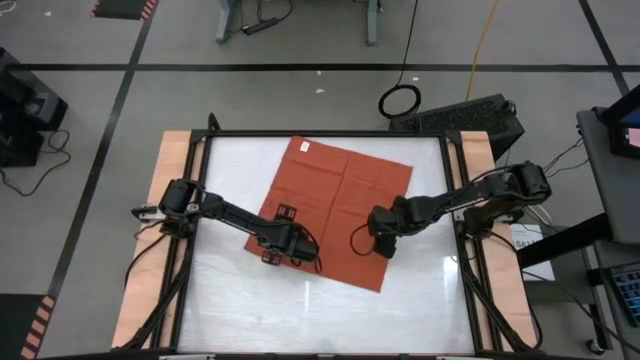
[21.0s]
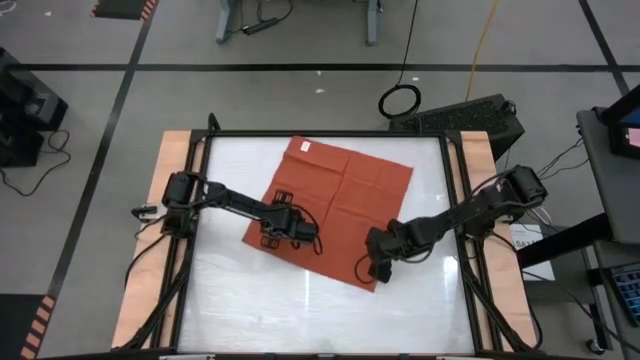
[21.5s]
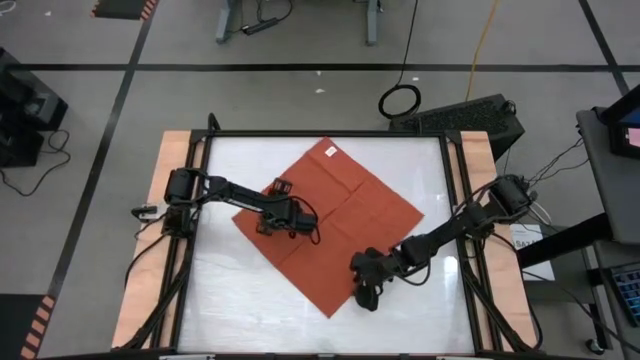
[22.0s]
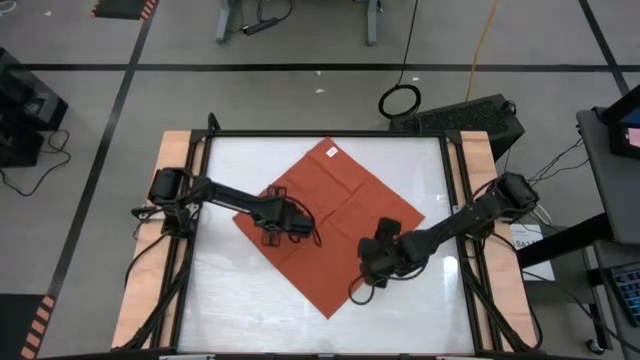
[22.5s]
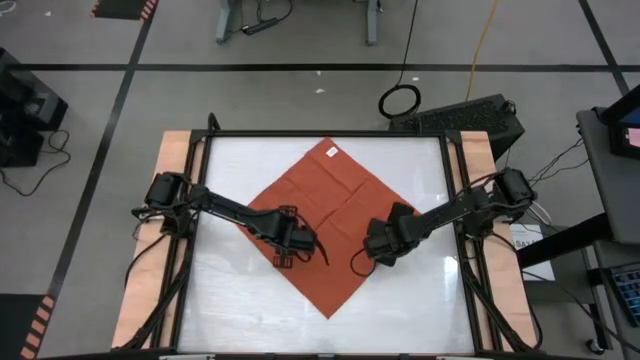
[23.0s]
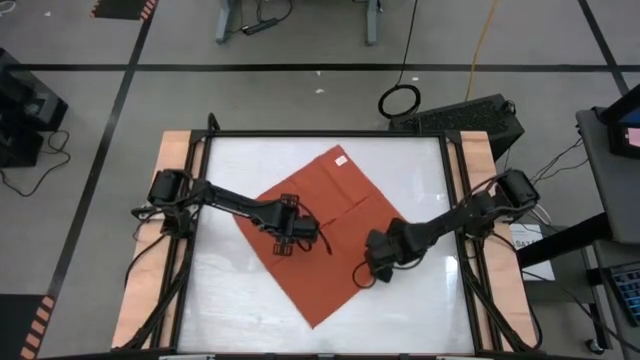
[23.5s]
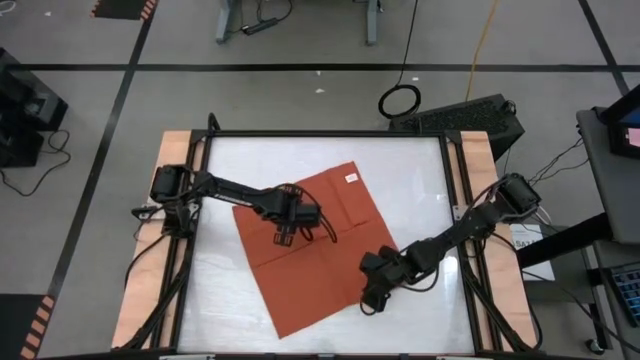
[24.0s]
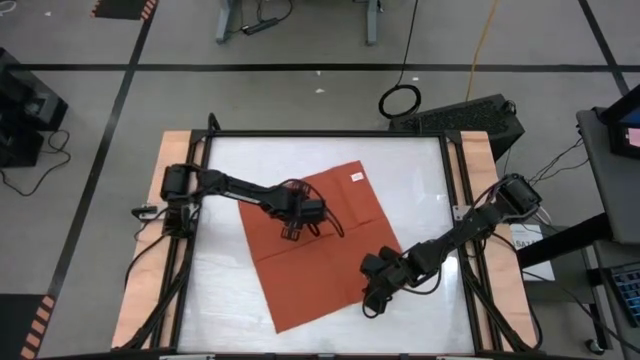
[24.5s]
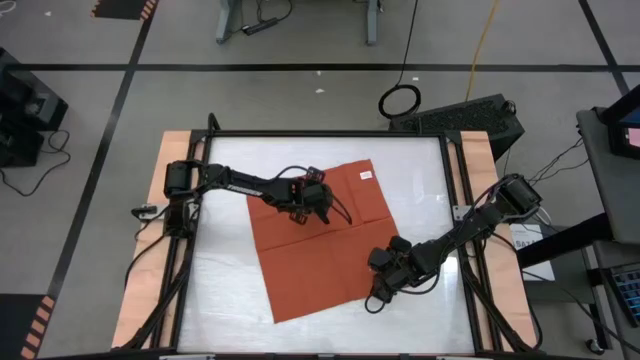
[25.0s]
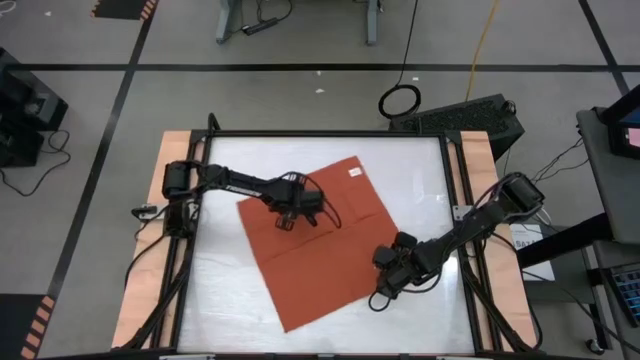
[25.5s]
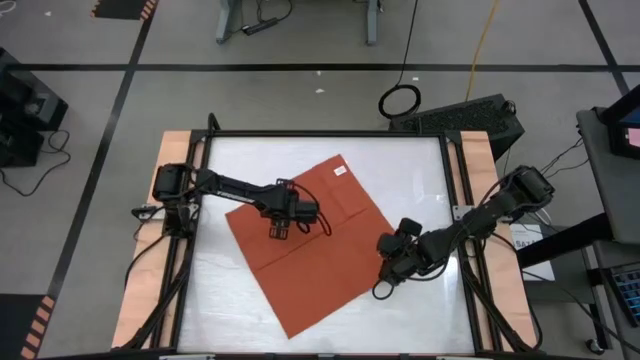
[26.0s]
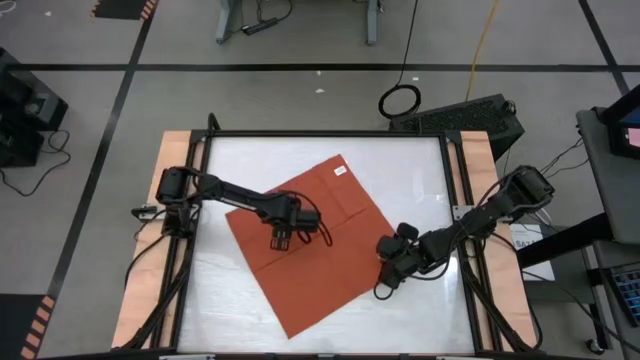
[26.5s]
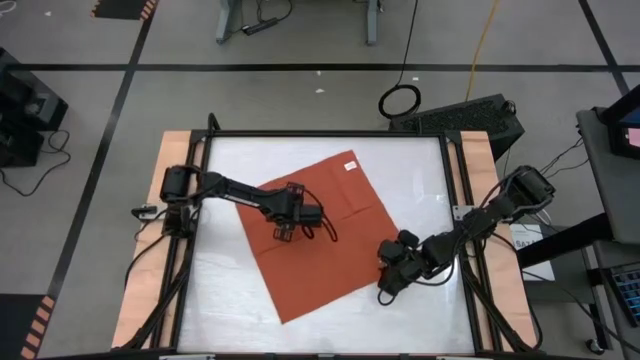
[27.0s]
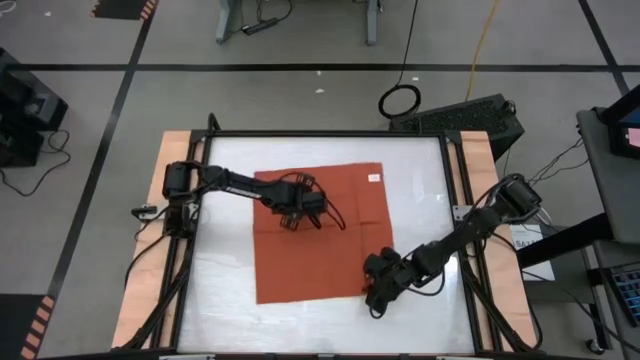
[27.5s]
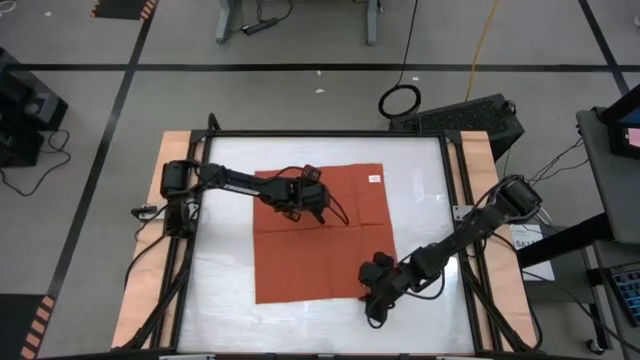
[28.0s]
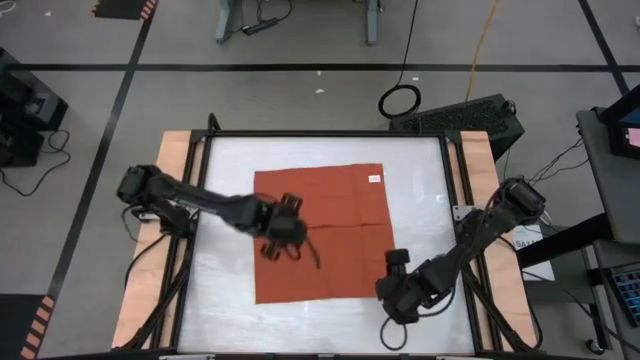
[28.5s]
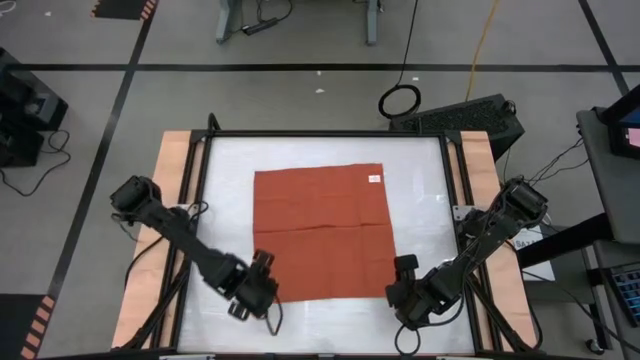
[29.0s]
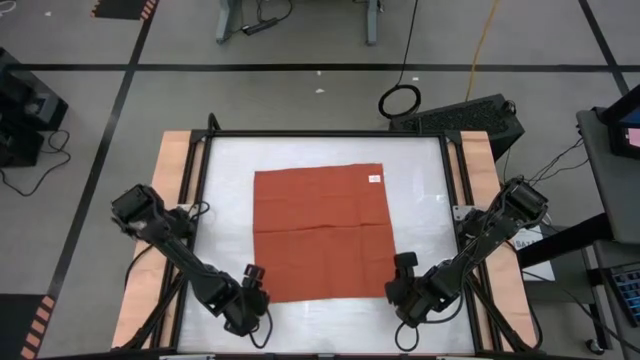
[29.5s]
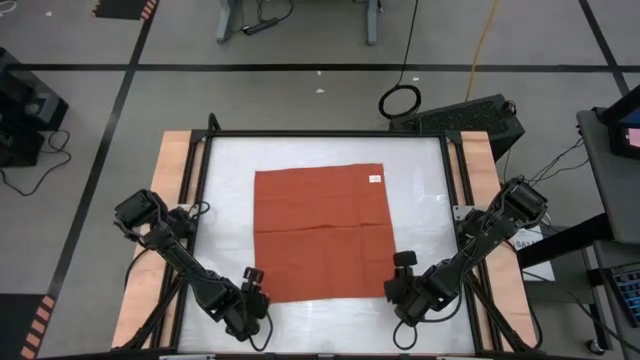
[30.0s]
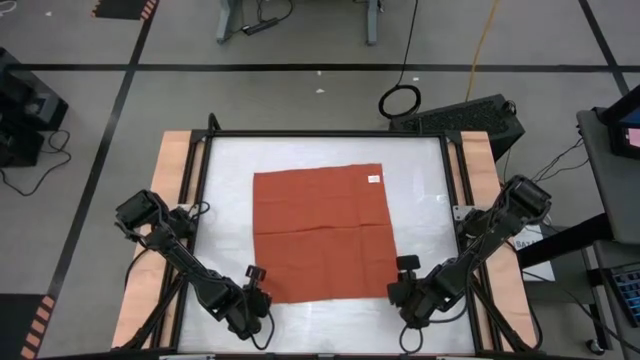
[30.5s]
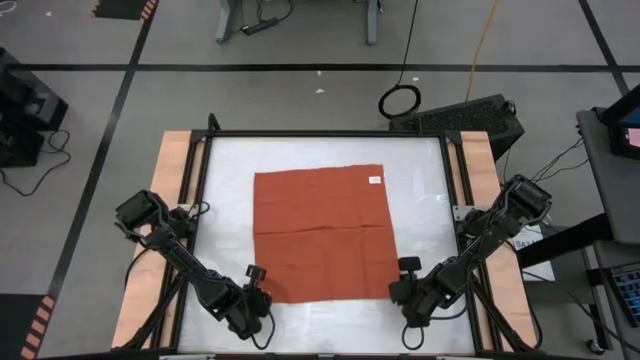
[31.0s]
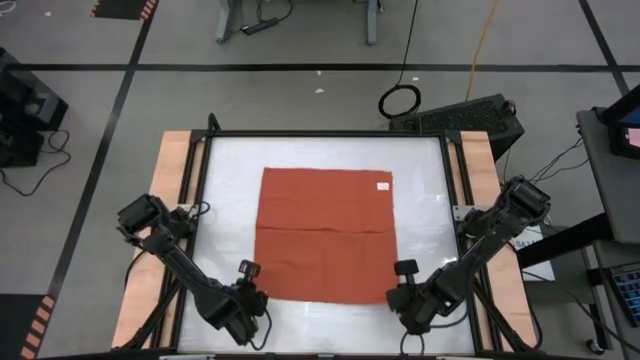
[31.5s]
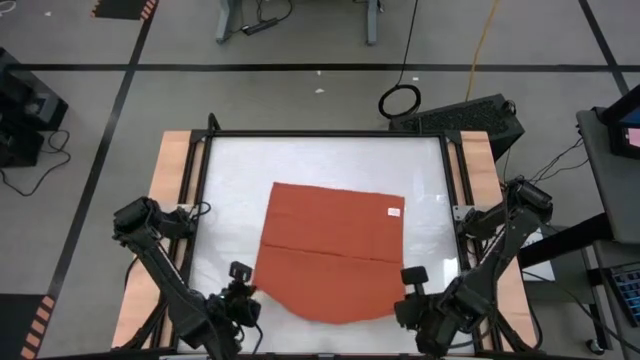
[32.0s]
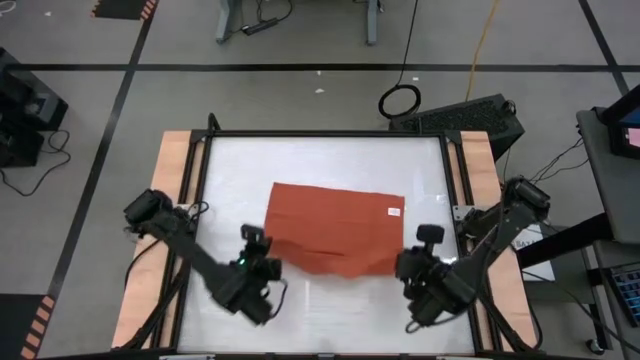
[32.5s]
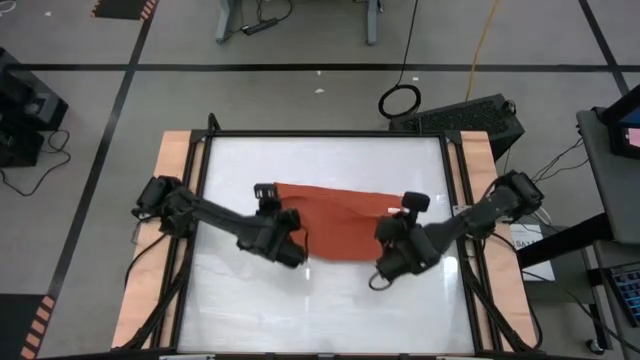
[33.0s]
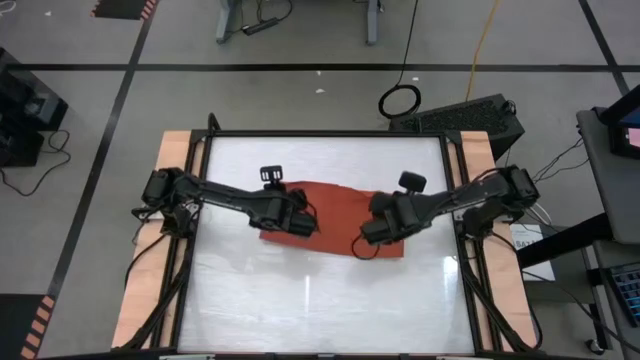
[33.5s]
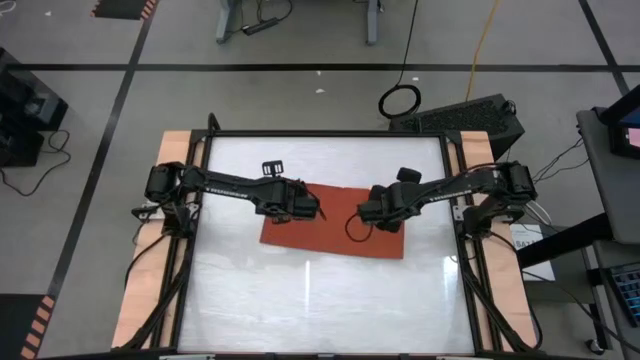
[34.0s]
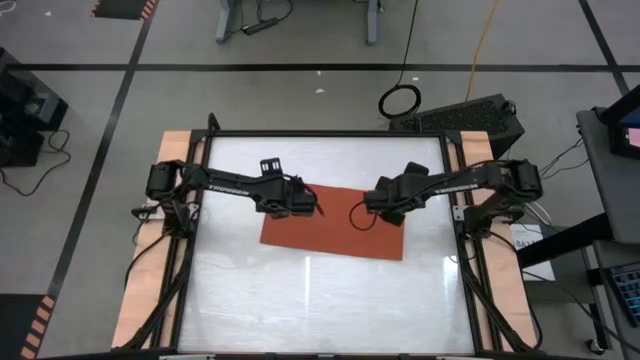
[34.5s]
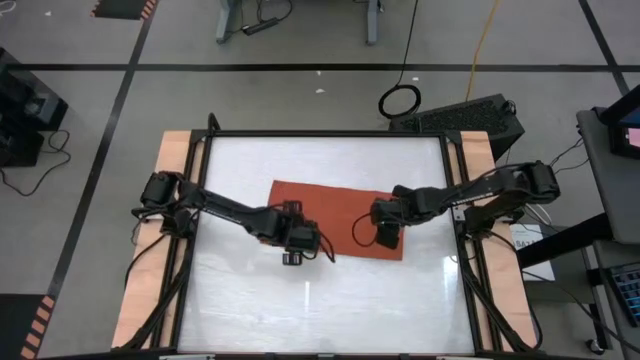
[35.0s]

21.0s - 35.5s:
Task: Roll towel into tight, uniform cylinder
Fold the kitchen towel
